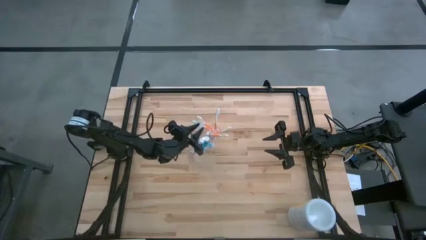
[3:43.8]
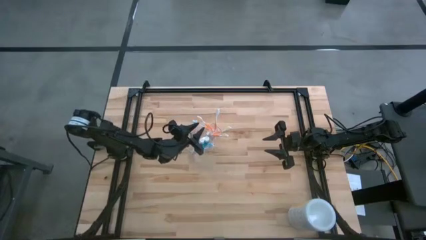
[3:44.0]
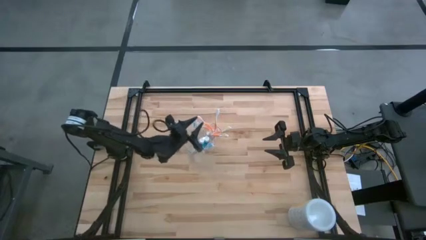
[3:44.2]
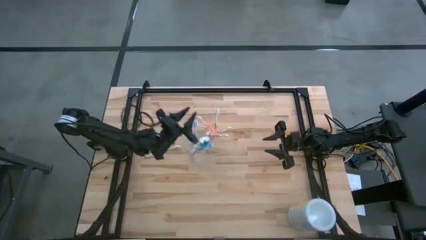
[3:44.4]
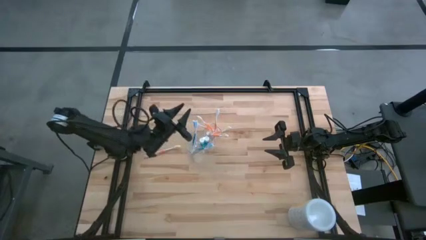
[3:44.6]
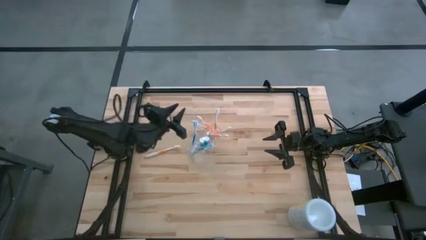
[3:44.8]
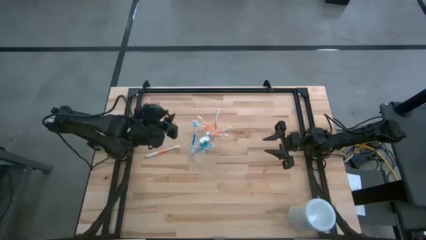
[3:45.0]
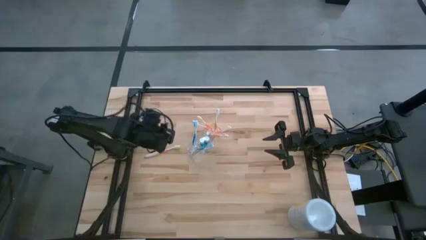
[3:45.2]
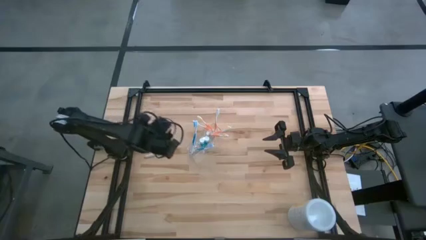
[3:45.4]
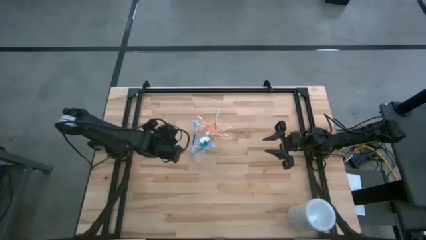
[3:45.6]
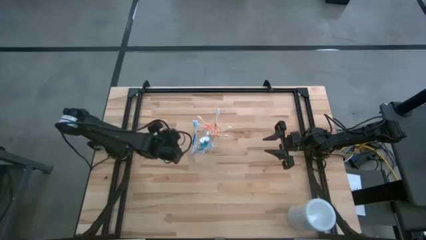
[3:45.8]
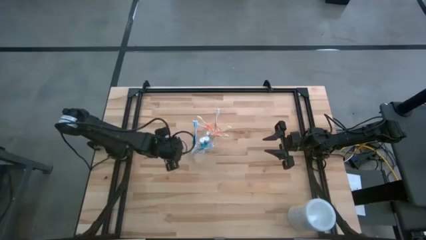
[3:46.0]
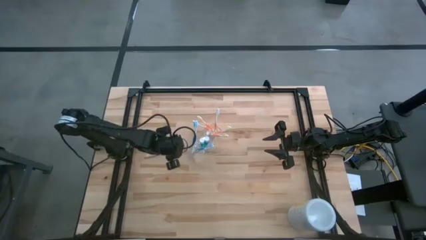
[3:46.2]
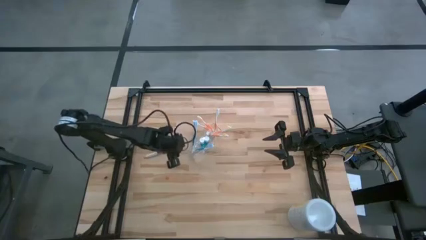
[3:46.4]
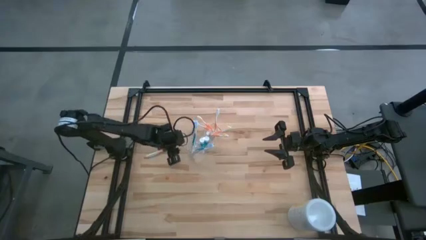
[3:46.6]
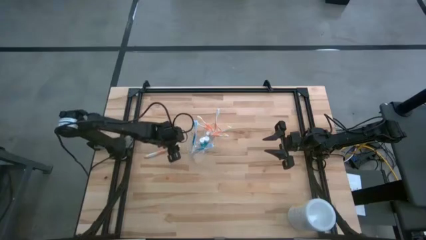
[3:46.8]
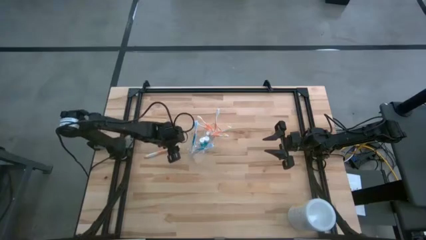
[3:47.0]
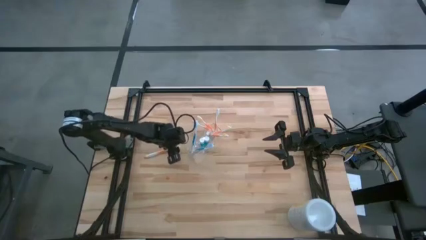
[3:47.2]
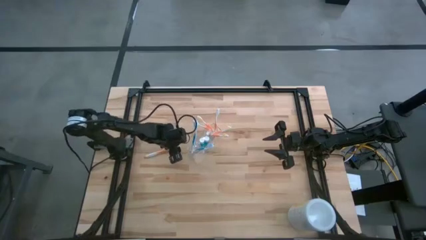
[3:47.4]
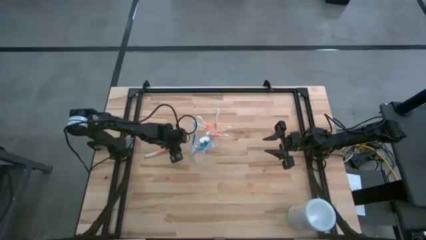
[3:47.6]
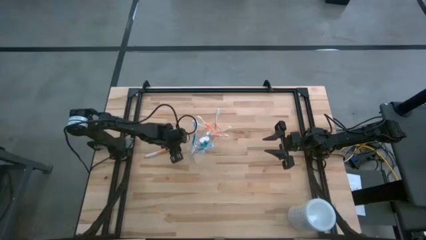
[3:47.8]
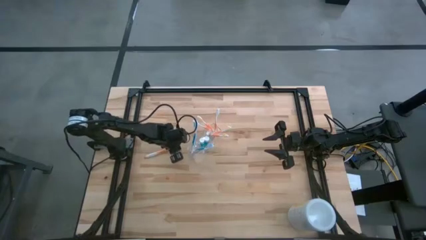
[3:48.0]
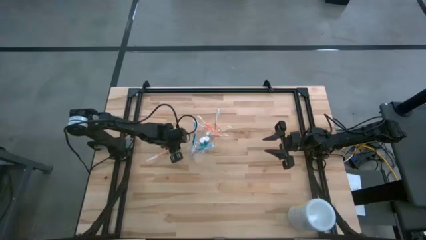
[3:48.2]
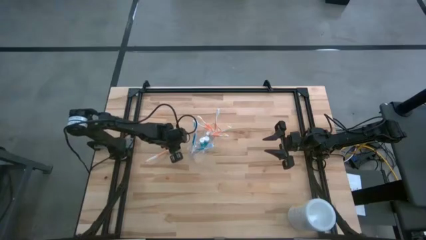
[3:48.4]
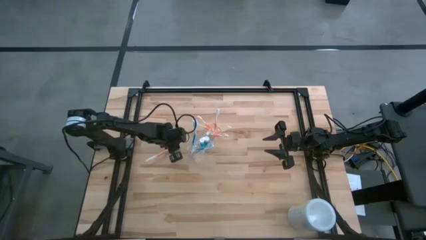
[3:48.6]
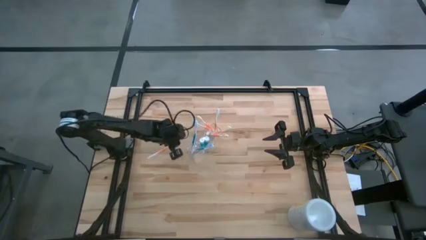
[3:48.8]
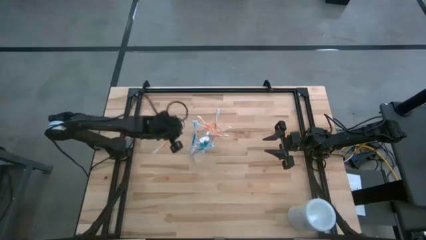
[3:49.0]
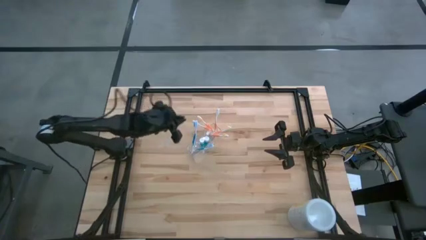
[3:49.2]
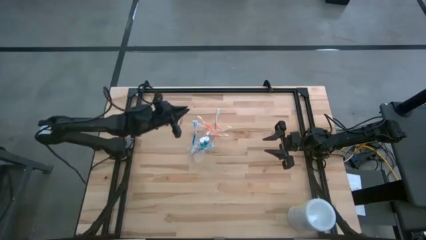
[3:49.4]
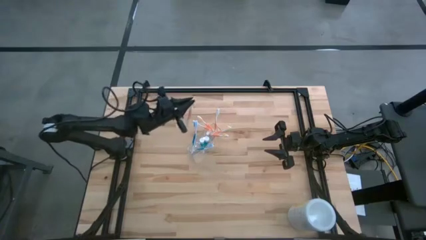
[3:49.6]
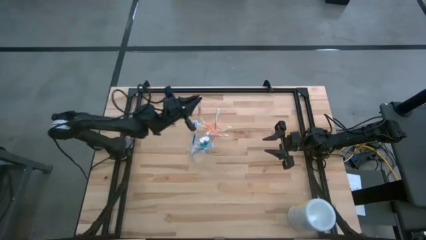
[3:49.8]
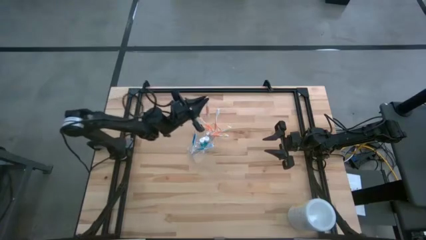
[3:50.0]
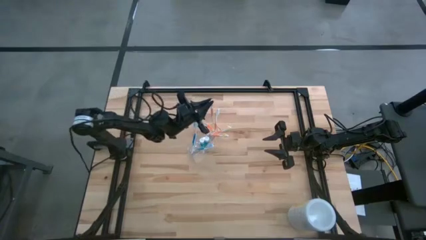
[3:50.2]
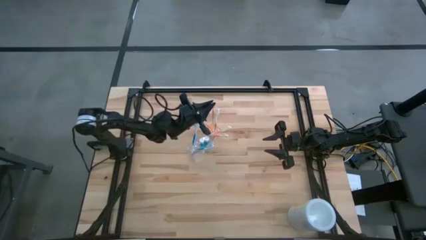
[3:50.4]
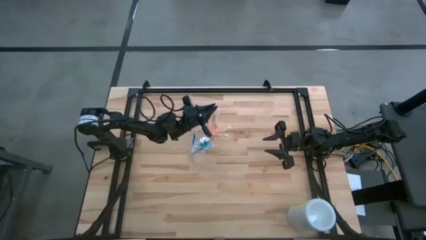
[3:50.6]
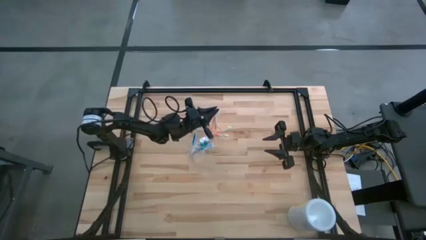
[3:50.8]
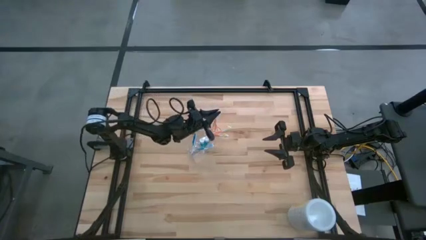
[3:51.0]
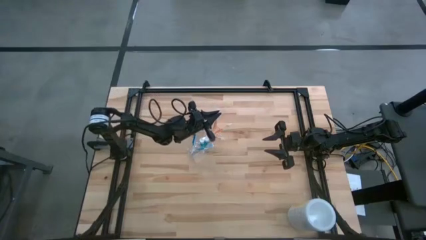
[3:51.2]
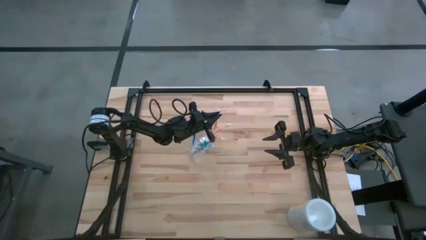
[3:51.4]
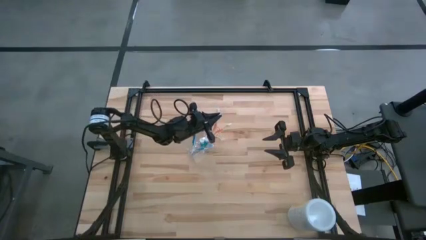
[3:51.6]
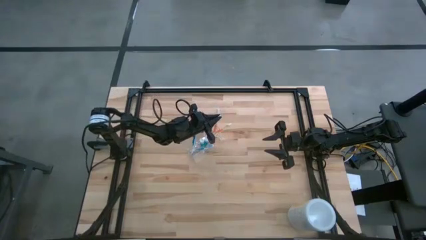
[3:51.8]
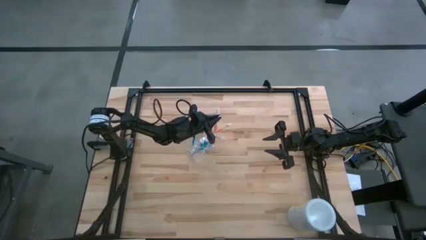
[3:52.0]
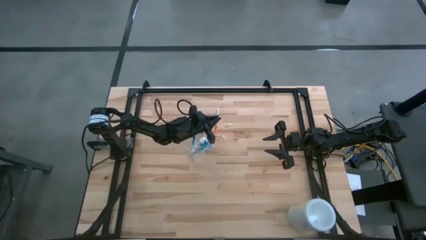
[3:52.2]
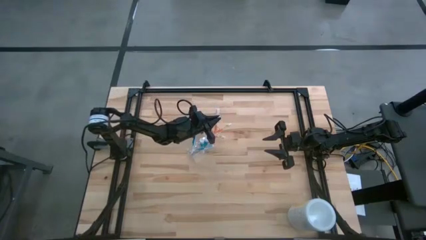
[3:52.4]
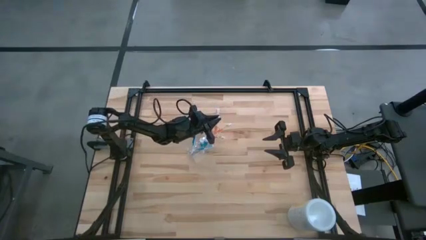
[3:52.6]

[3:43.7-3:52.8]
Task: Pick & Place toothbrushing station
Put the orange toothbrush into the transparent organizer

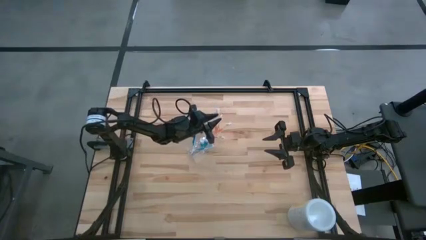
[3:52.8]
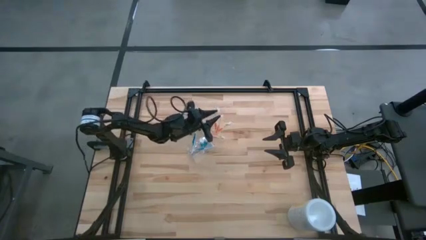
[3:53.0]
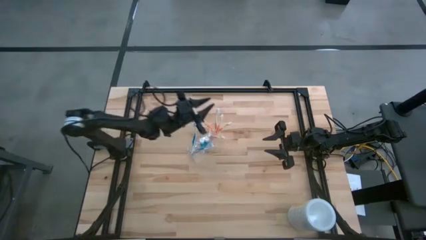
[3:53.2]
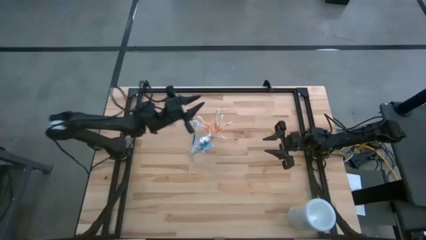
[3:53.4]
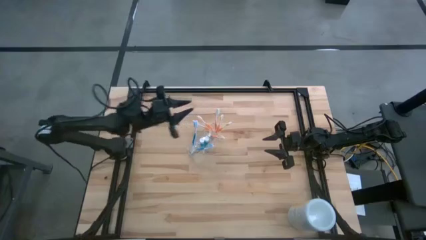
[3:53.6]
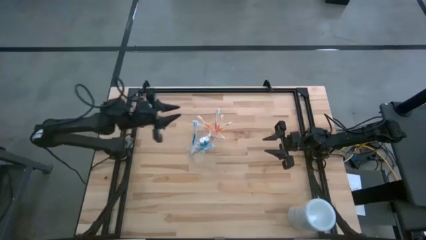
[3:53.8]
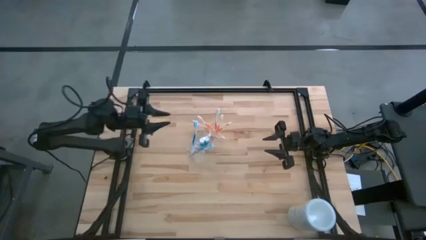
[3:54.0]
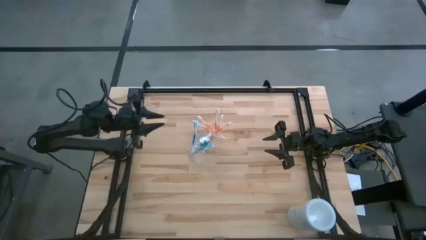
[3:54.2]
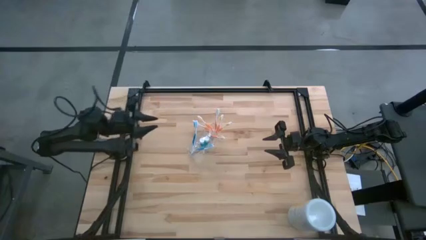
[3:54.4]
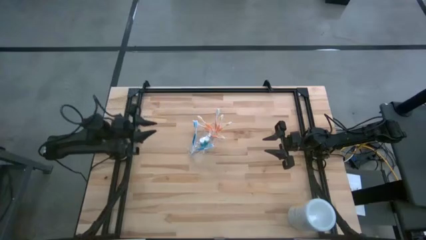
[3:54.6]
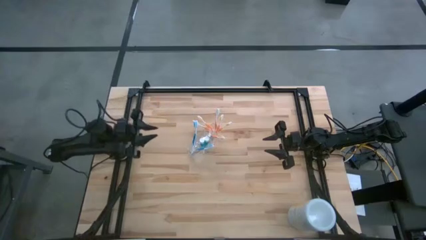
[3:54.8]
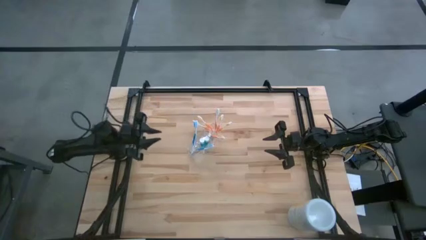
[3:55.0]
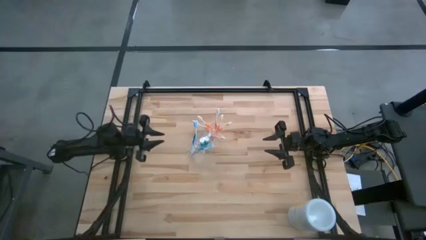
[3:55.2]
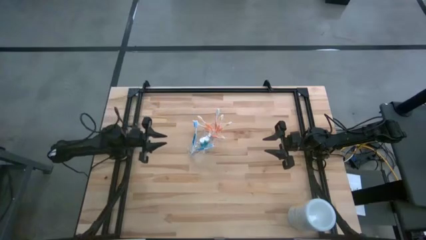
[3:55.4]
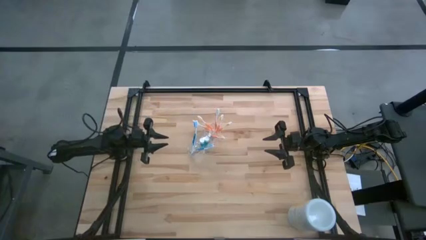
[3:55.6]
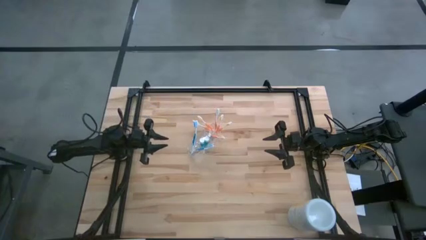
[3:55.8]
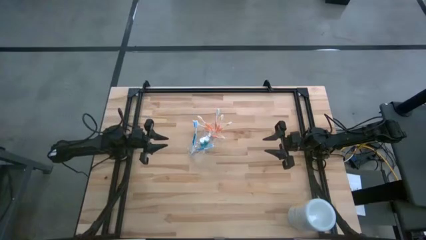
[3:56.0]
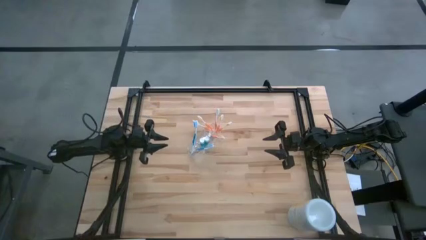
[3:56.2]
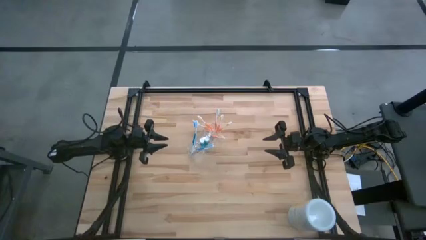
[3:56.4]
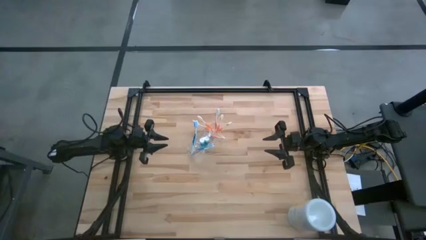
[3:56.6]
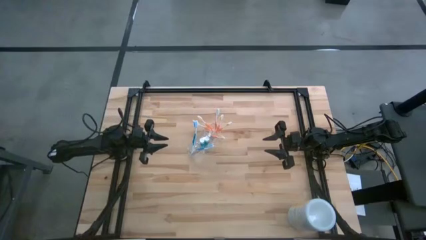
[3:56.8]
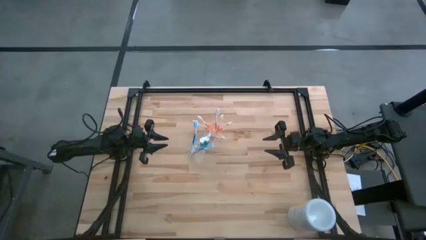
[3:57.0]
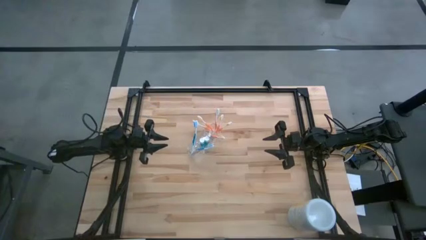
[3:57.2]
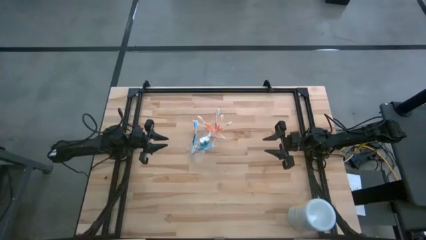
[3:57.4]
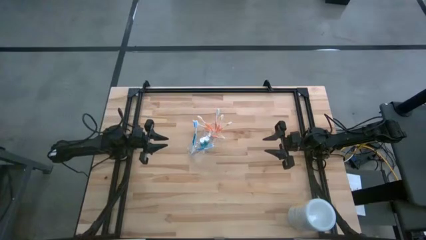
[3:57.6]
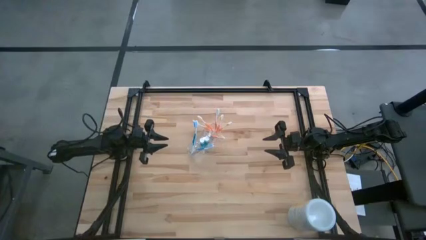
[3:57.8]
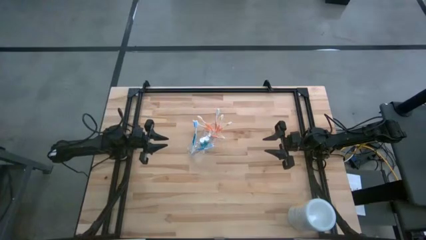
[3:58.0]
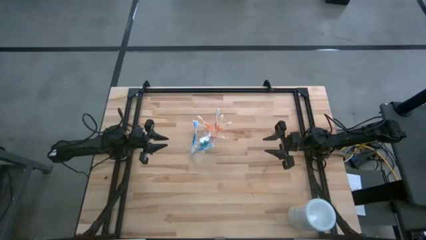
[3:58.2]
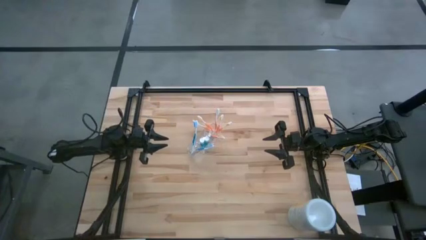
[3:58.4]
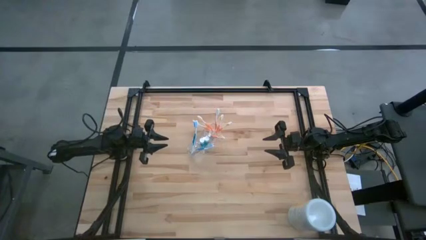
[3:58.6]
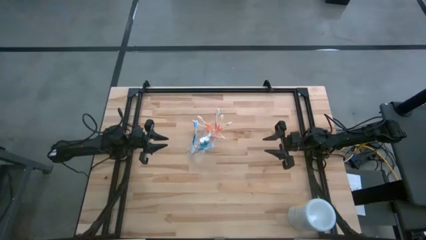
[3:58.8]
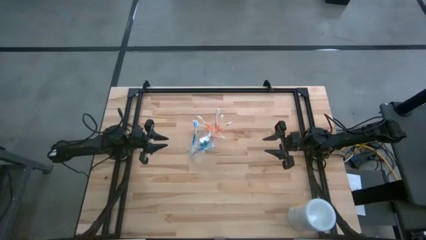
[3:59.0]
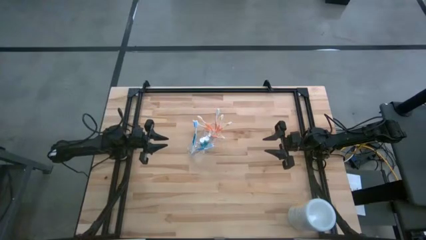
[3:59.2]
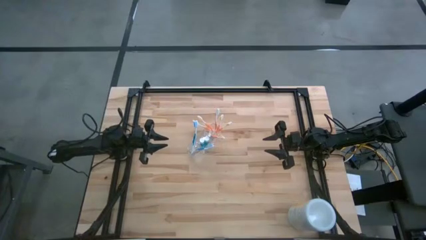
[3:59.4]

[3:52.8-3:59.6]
Return to Home Position

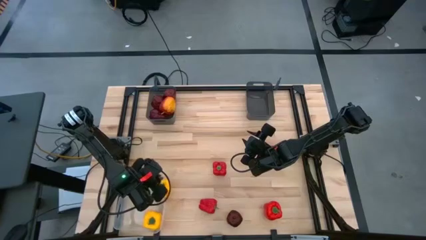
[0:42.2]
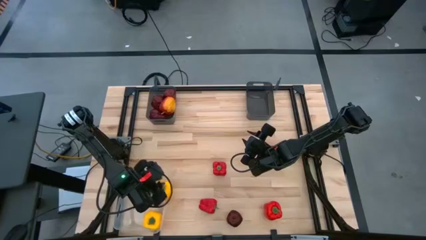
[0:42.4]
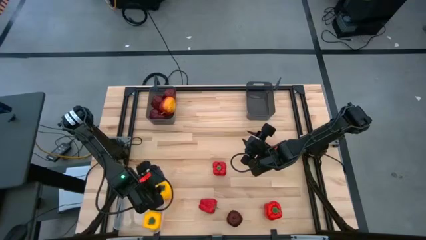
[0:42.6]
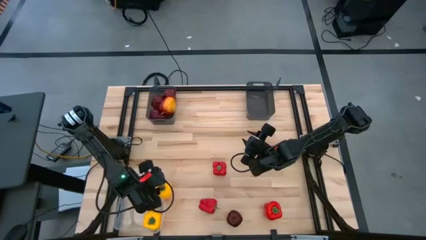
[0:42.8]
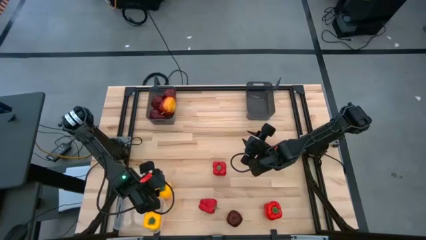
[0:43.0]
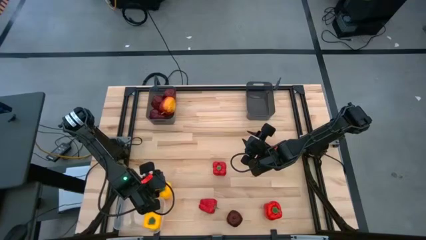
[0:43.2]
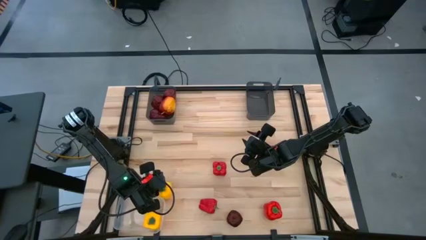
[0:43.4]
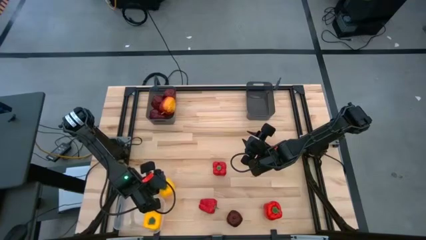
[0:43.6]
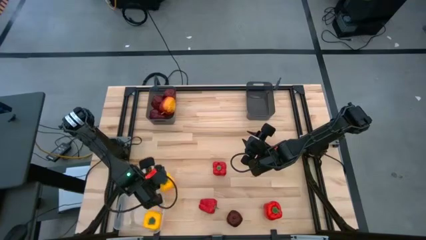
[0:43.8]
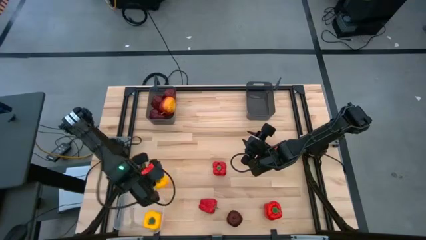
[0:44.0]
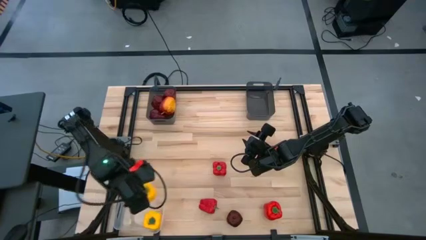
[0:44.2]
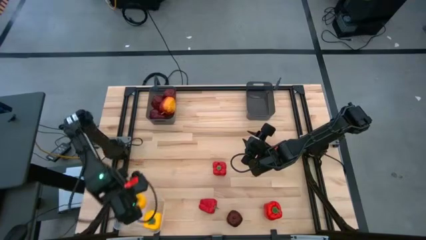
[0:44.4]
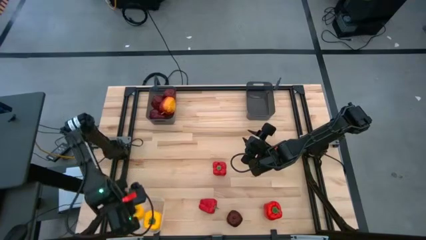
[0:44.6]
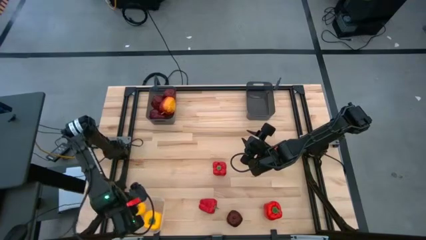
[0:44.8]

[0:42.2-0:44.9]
Task: Sort produce into baskets
Put the yellow bell pepper into the transparent bin
